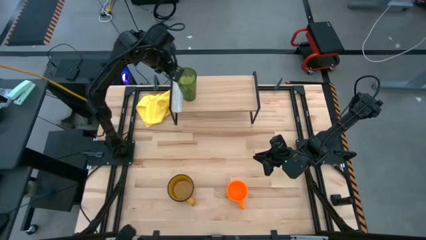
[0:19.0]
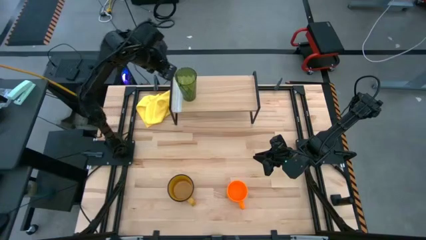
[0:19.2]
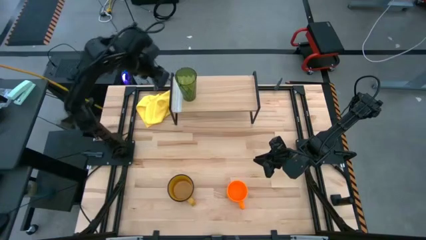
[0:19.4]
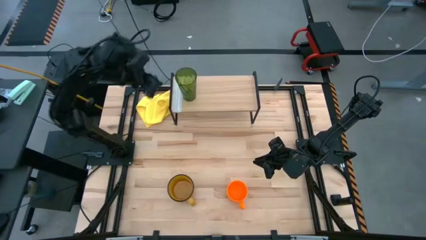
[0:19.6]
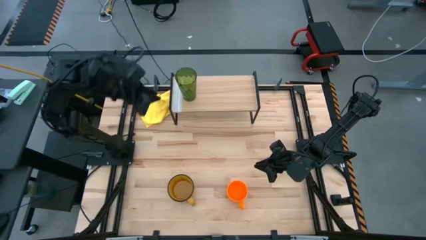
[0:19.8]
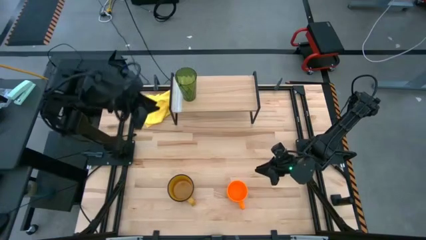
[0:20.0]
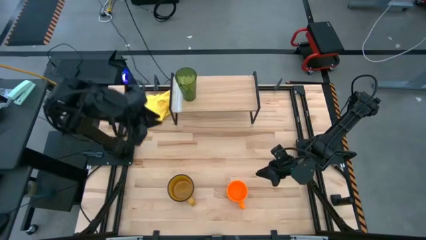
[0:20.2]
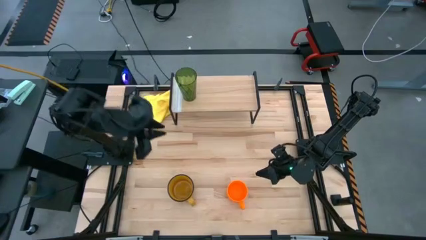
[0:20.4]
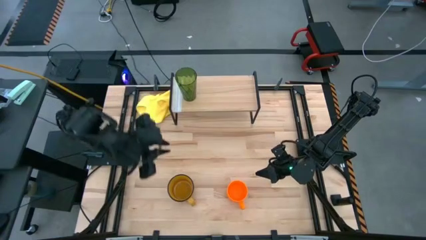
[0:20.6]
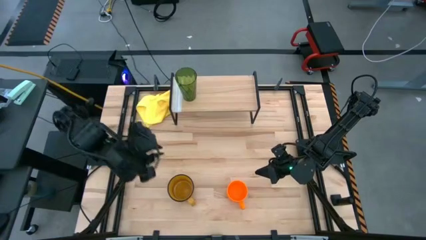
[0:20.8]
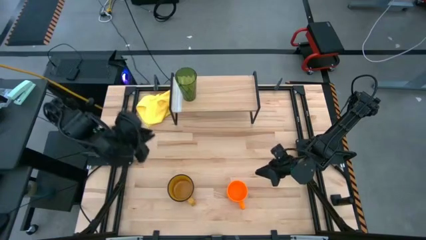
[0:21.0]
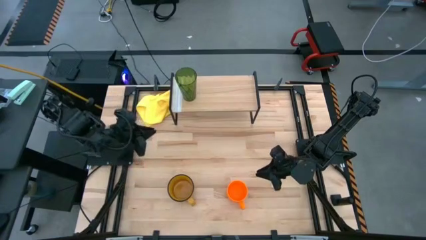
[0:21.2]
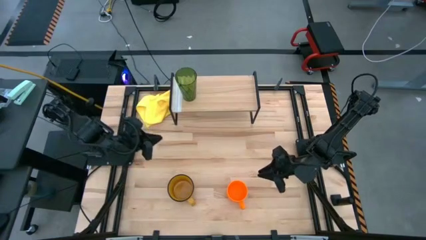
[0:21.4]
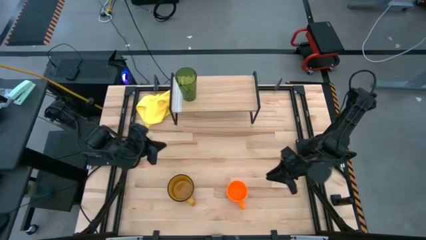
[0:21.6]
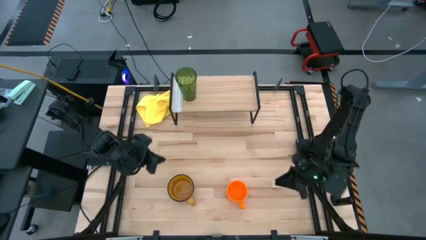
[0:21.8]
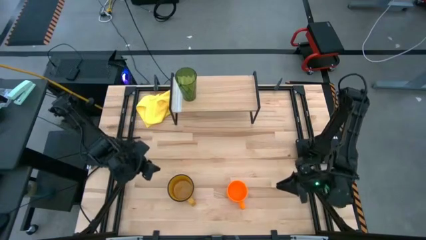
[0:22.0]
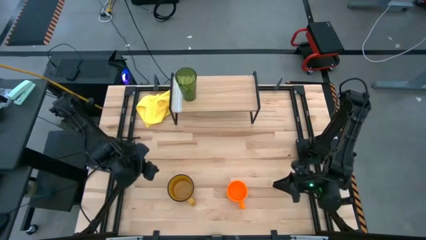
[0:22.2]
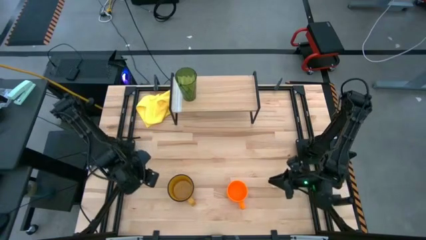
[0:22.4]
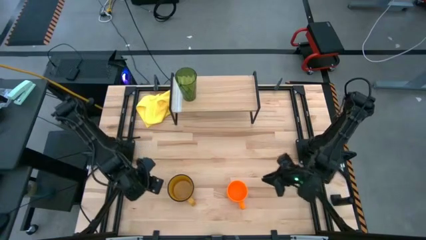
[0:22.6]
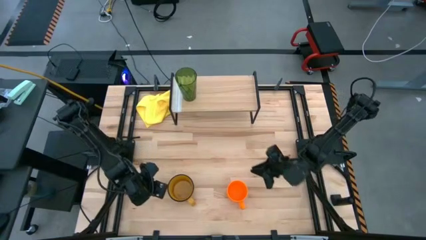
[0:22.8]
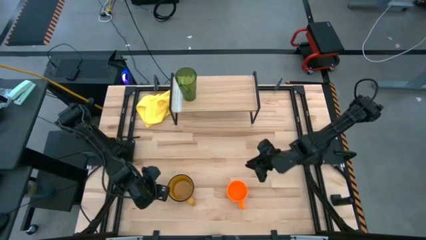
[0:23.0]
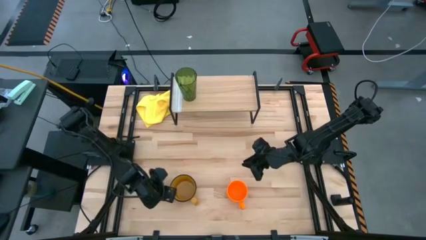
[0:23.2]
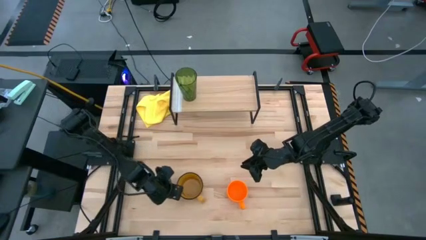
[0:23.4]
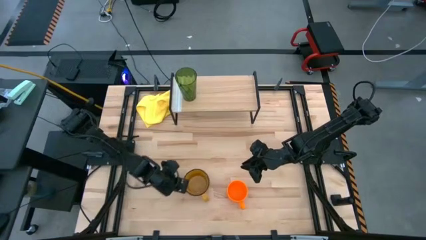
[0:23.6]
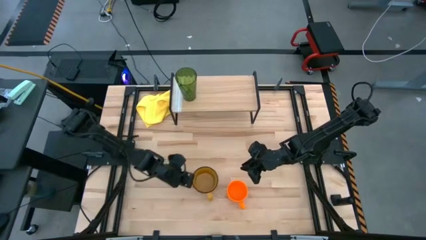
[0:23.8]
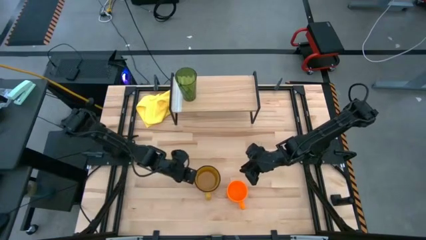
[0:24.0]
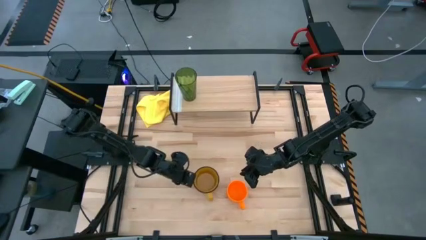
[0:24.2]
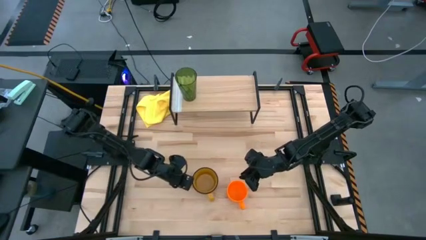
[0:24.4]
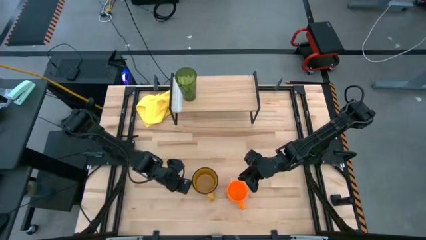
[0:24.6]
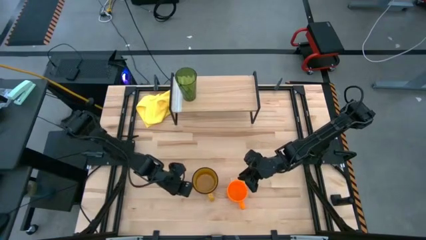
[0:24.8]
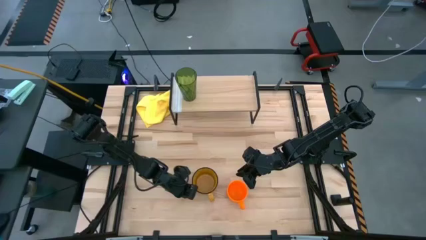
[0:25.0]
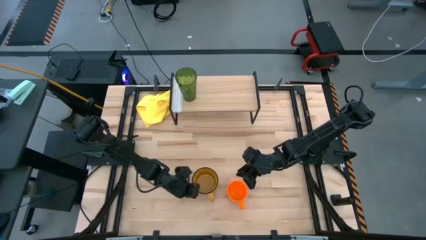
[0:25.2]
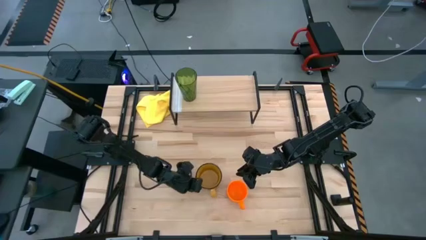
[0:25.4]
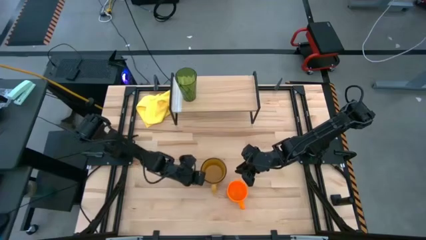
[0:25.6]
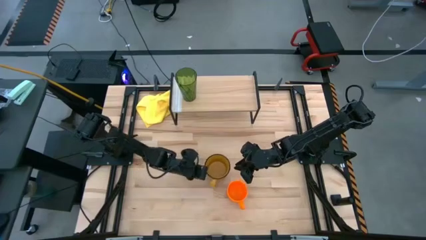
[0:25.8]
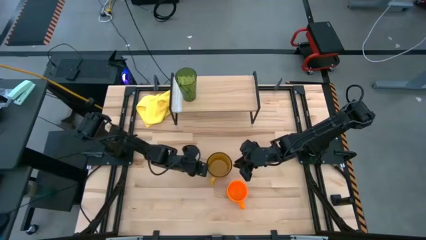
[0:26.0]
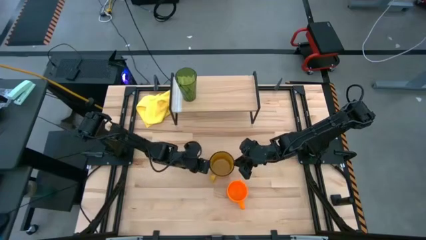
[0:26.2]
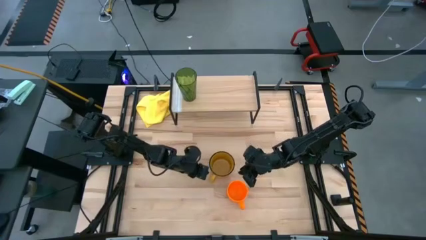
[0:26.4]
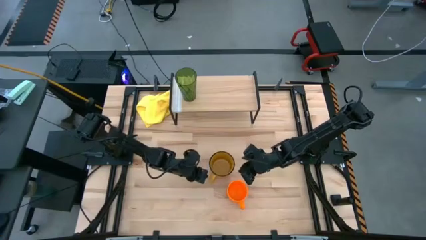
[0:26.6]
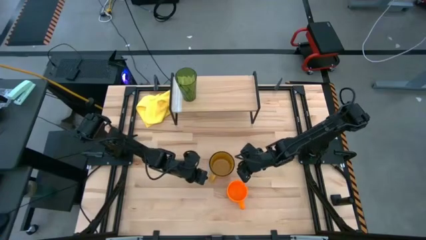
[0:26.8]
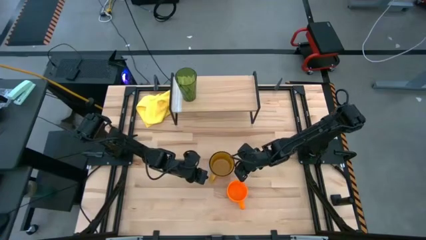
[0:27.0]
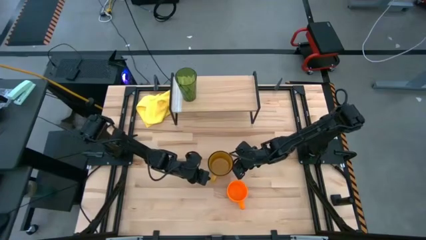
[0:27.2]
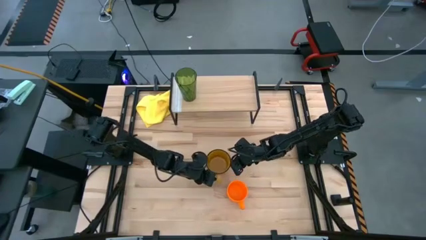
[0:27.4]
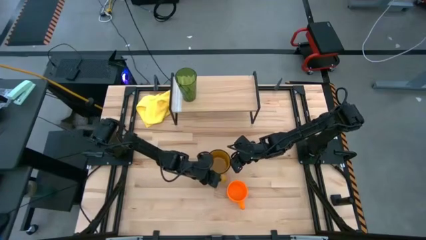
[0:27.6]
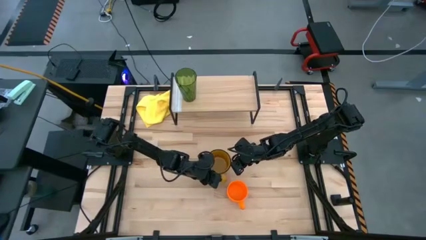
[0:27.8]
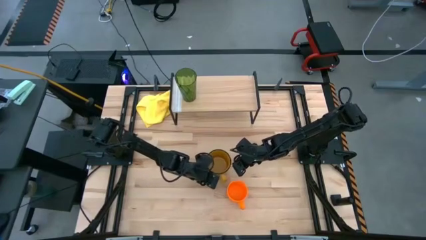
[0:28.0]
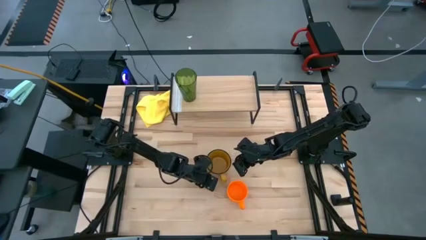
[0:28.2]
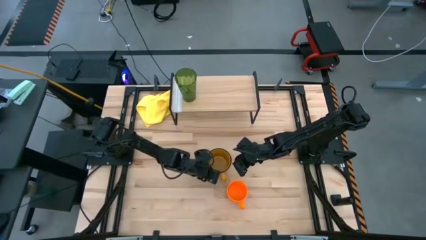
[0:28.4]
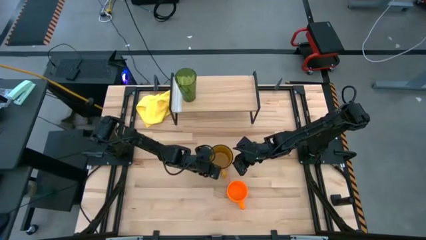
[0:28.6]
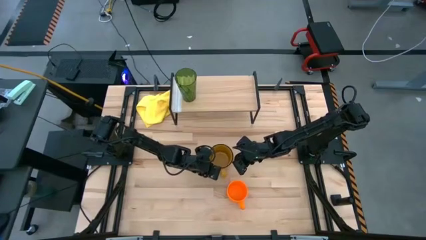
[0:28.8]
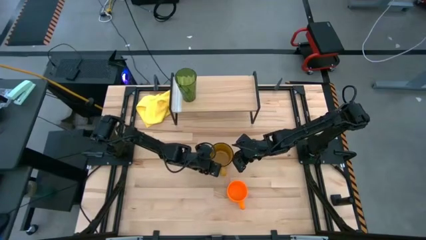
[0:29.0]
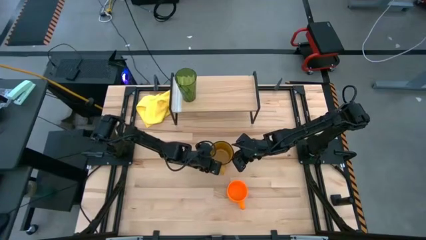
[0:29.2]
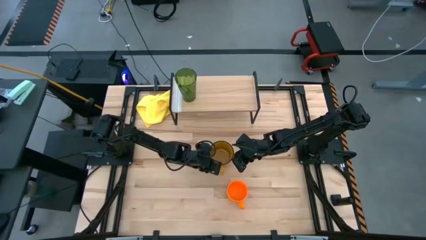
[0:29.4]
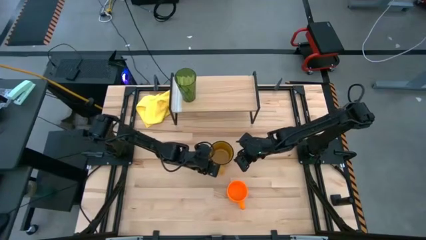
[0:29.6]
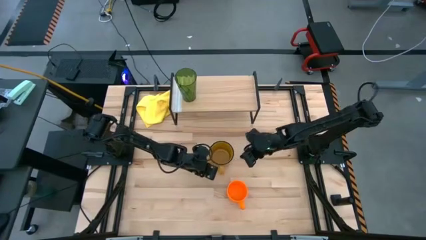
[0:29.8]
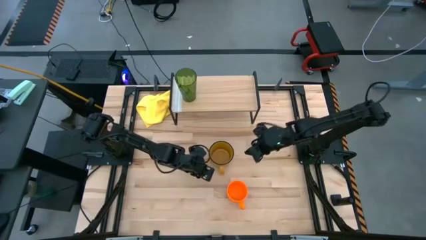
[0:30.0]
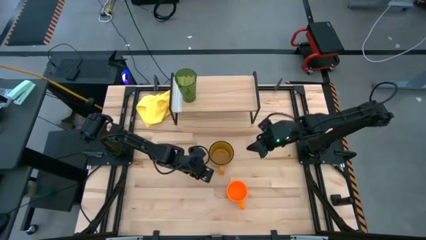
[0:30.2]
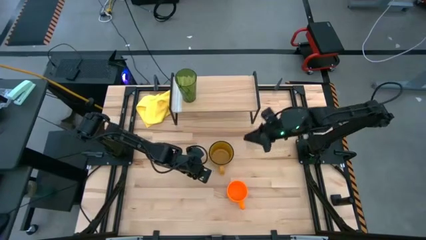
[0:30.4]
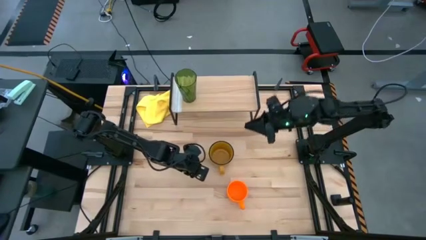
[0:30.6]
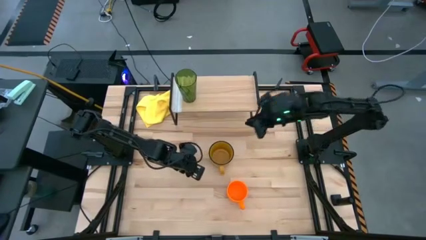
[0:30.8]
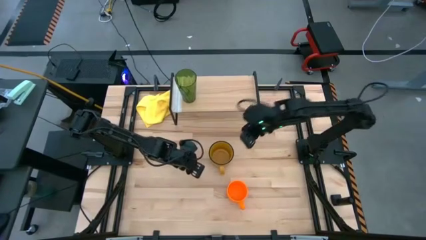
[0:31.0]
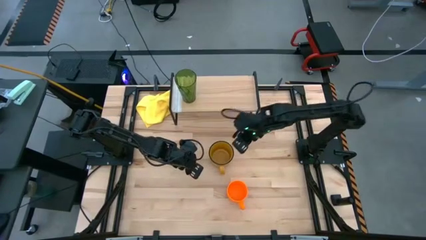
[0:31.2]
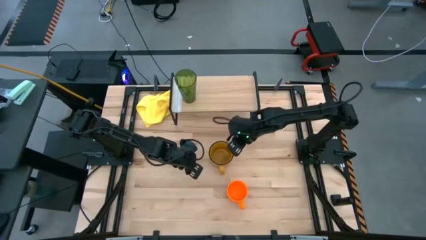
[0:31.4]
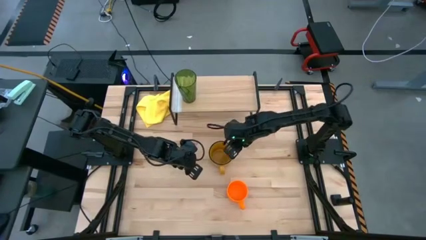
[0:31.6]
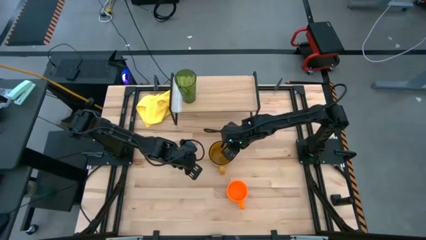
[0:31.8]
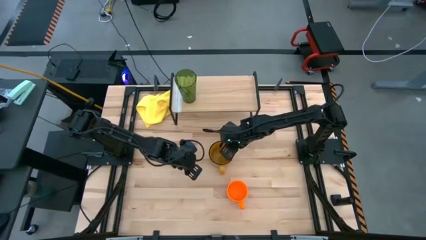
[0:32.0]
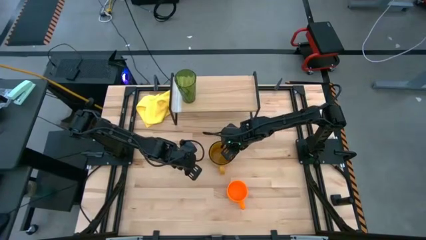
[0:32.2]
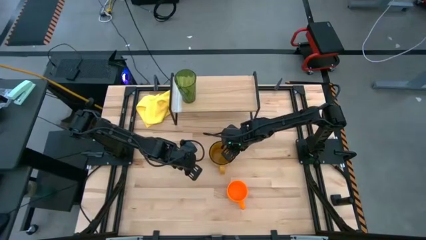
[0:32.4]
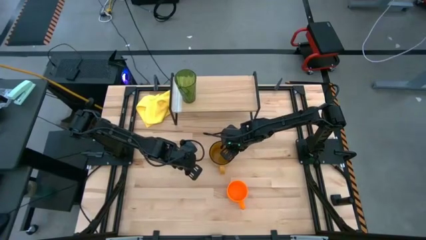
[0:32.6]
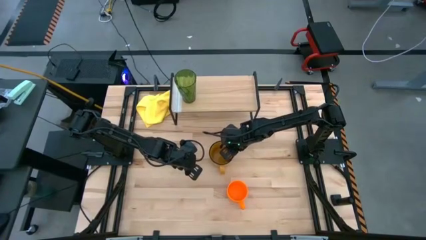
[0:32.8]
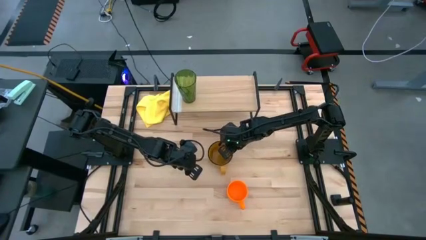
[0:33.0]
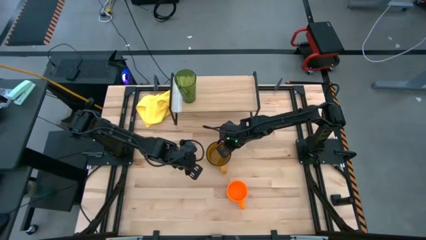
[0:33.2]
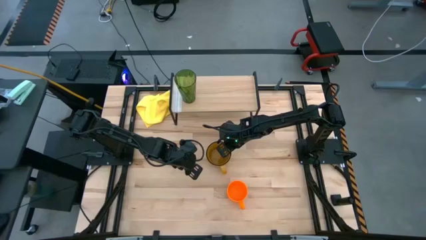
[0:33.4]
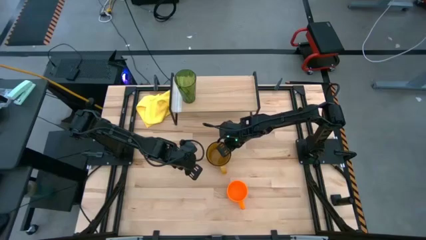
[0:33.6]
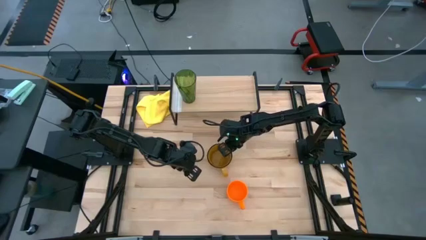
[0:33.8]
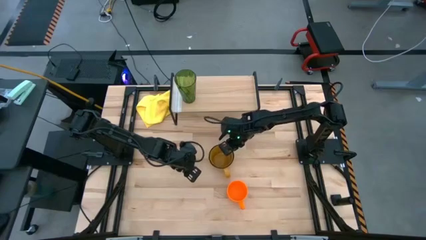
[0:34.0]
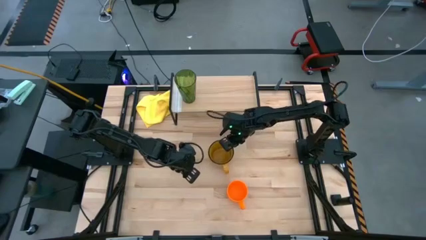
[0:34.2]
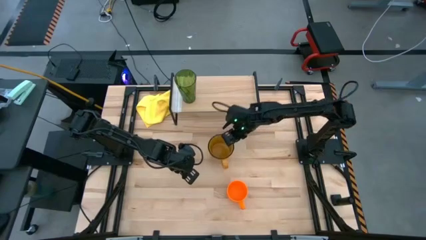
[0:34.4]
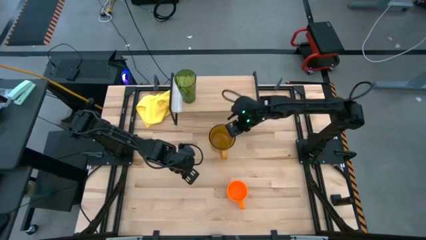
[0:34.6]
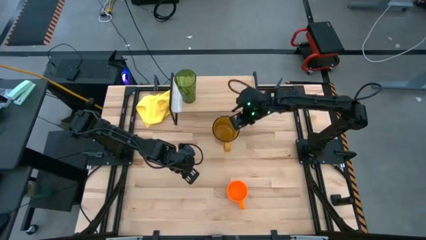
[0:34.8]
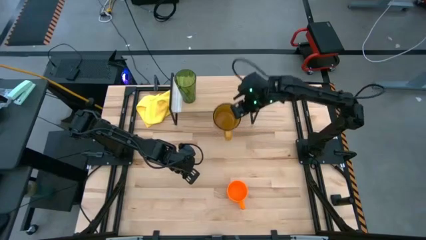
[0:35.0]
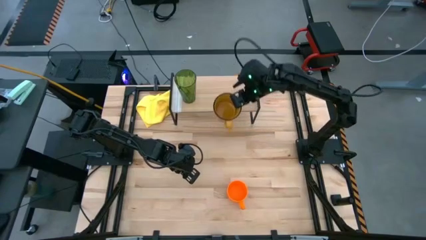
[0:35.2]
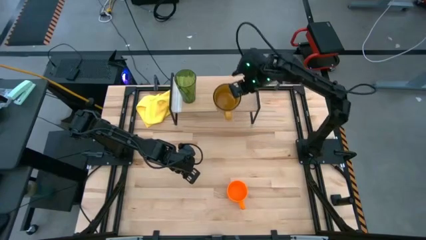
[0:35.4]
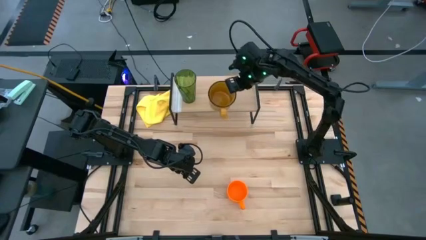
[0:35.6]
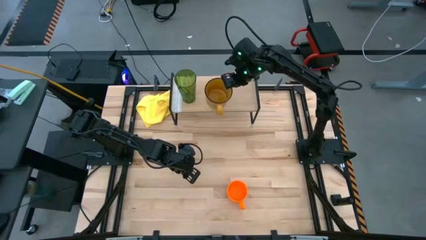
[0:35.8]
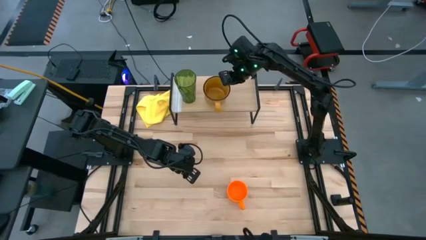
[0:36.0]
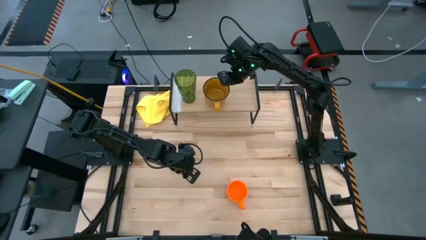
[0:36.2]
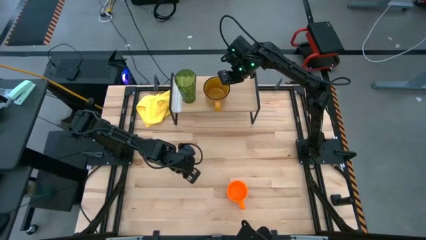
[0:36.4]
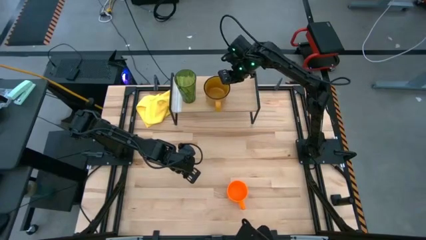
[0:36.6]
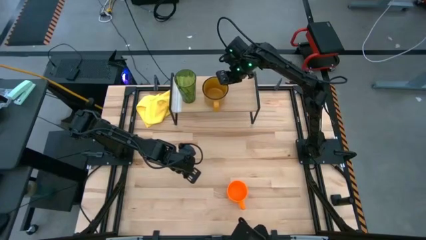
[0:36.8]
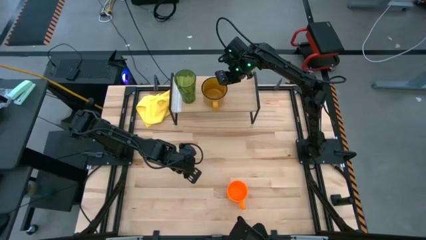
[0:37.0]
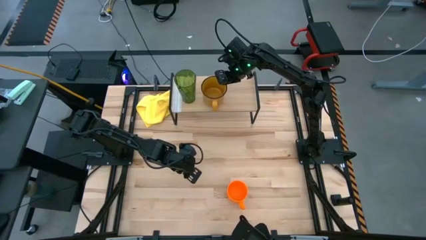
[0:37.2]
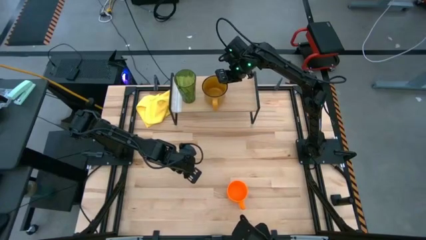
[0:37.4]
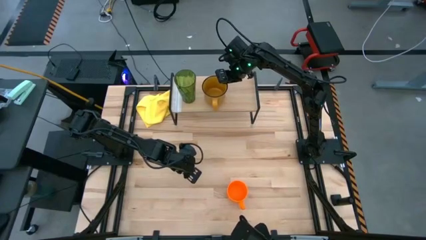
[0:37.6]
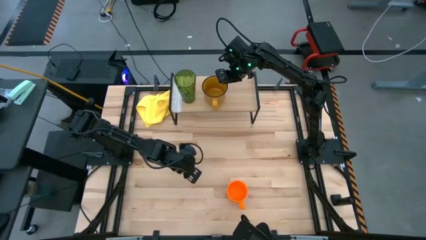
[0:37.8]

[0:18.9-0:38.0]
Task: Stack small to large cups/mugs on shelf
Put the yellow mug on the shelf
